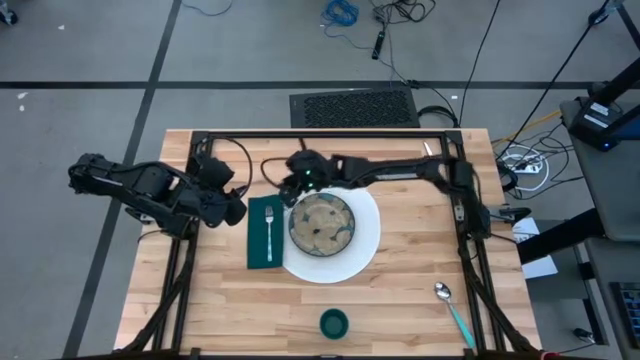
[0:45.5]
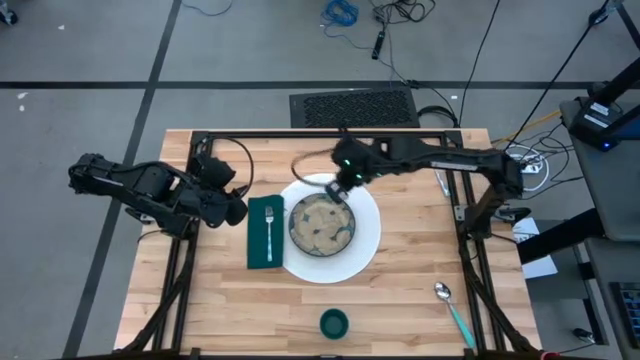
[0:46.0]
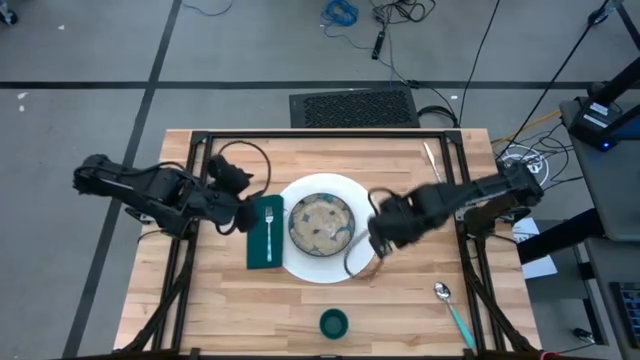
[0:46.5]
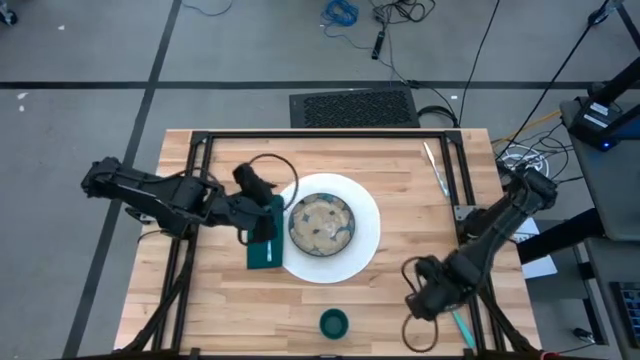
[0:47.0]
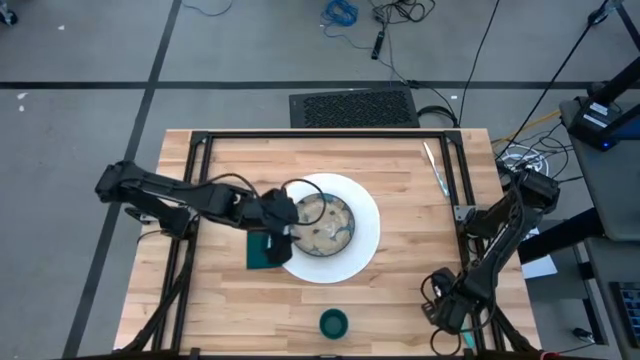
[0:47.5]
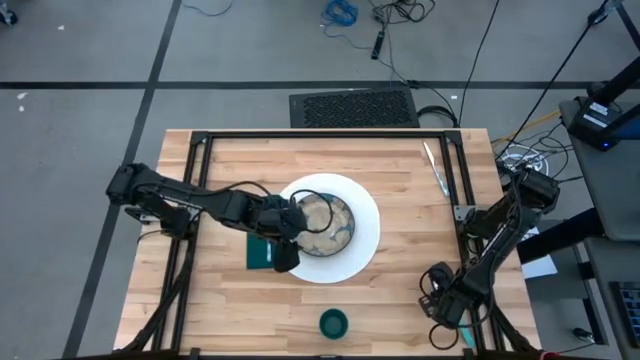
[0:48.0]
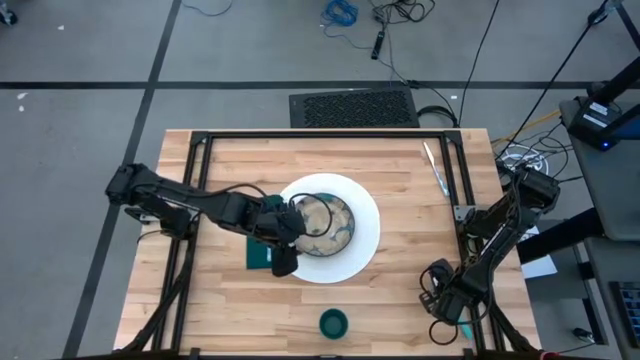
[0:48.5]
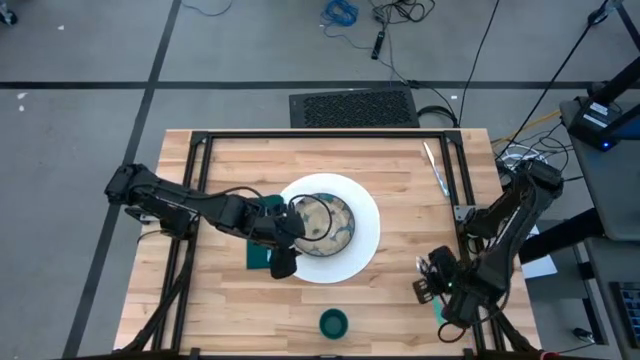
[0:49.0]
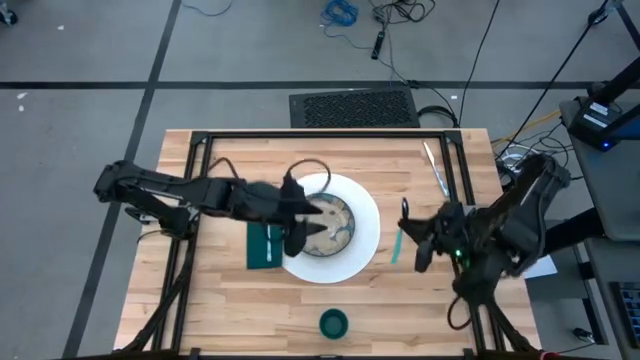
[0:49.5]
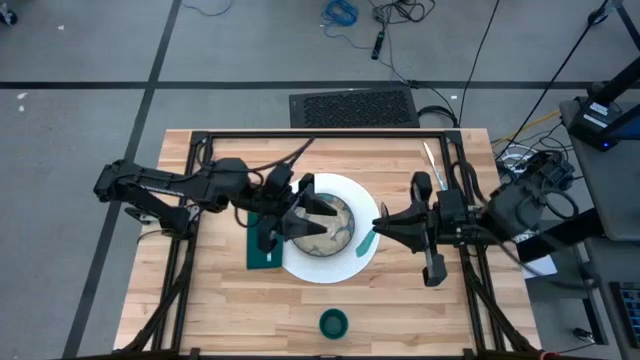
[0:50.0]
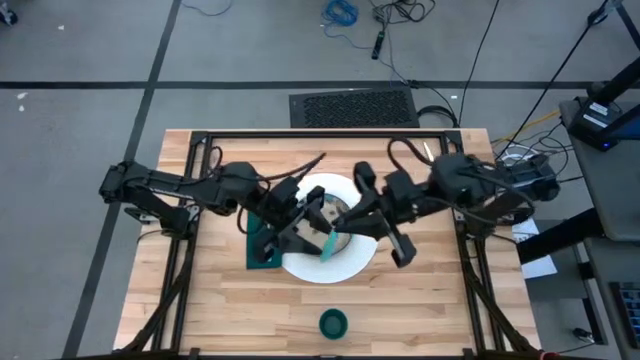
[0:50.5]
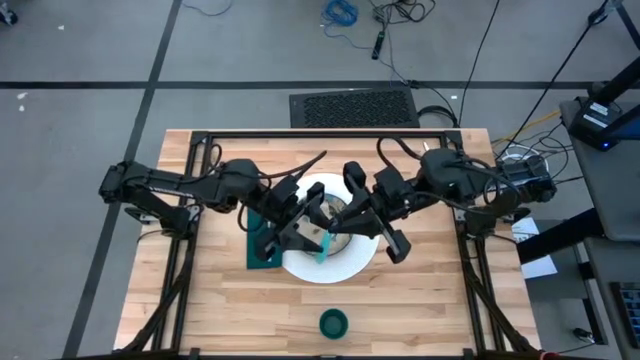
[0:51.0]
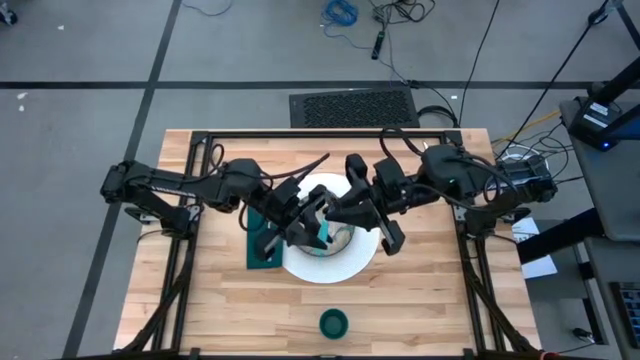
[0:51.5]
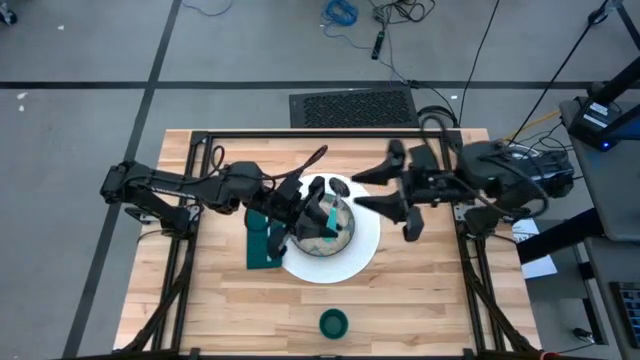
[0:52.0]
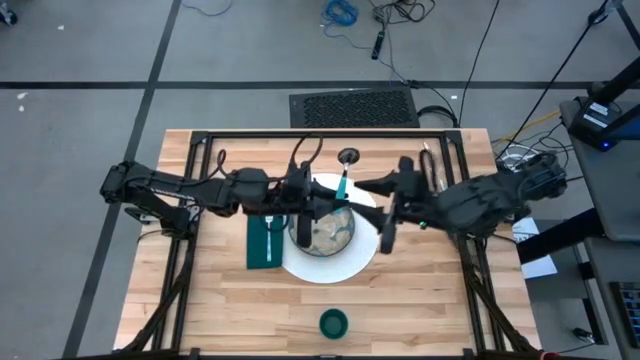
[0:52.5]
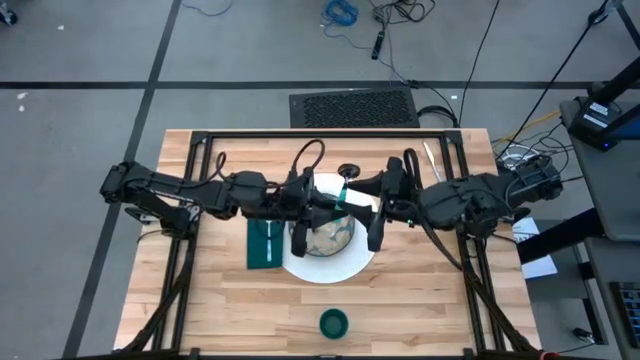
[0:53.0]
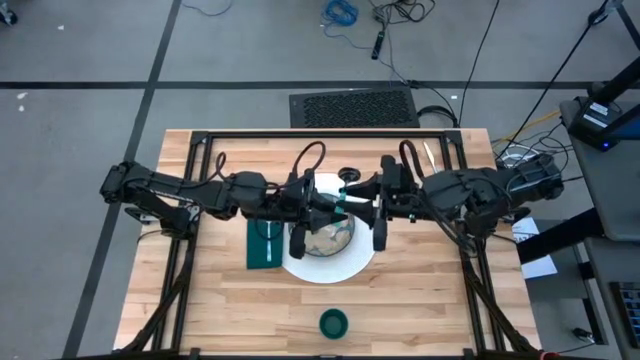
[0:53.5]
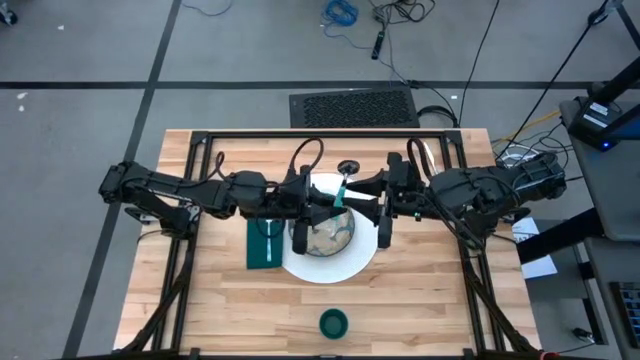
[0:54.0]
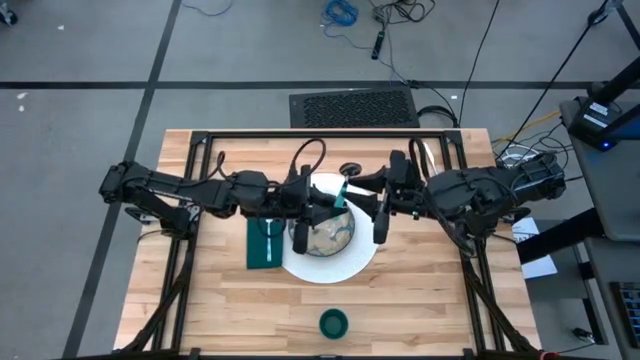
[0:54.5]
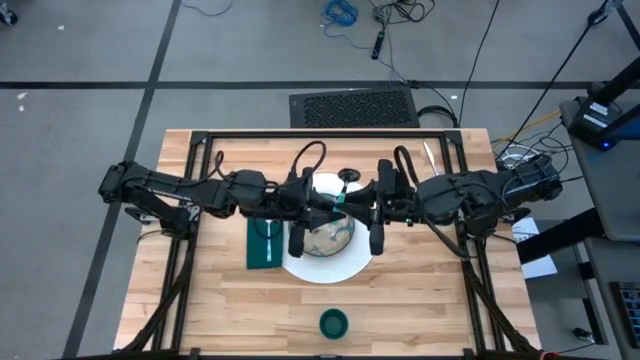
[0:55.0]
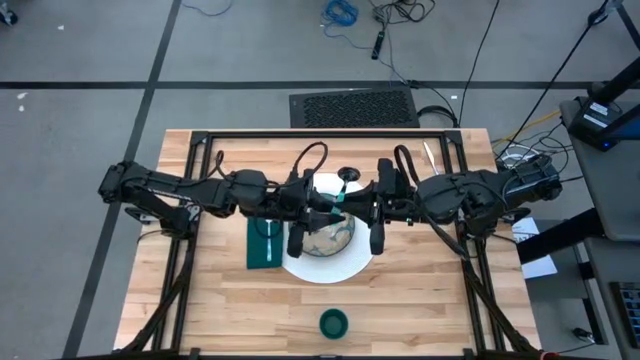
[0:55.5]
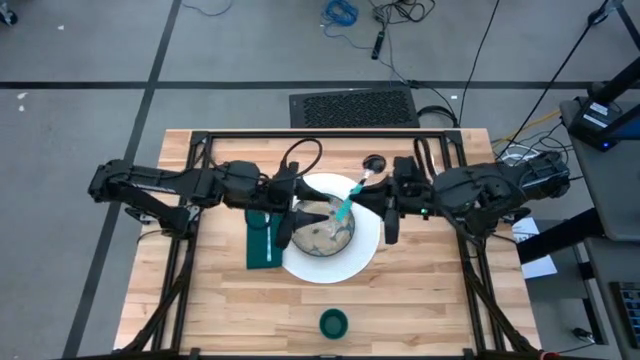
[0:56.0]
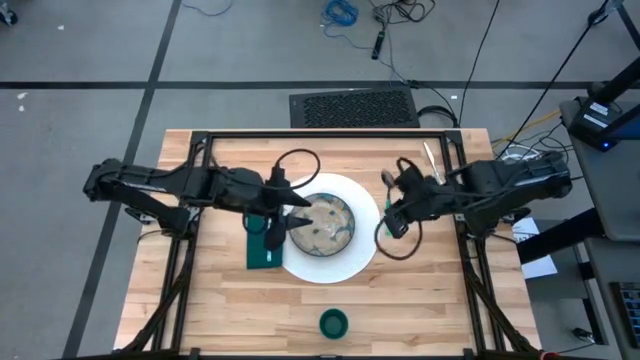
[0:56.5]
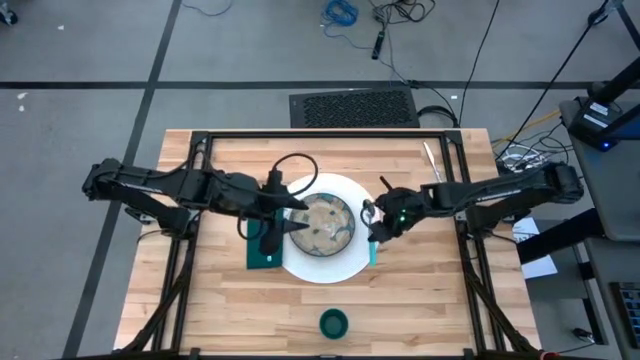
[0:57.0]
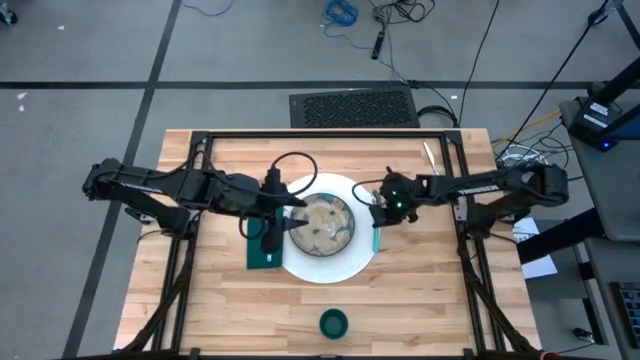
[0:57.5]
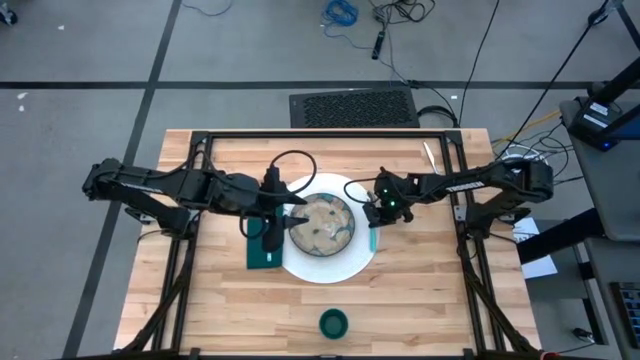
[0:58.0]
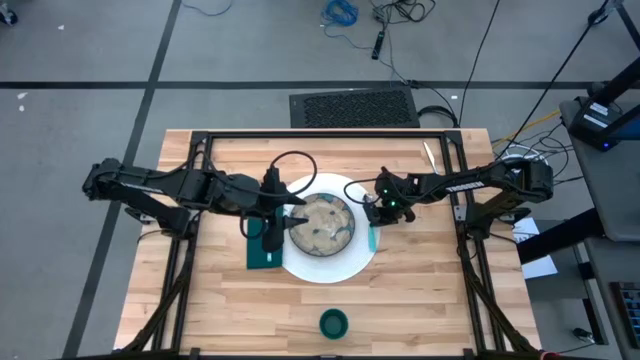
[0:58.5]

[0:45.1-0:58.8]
Task: Set table place
Put the green spoon on the right side of the plate

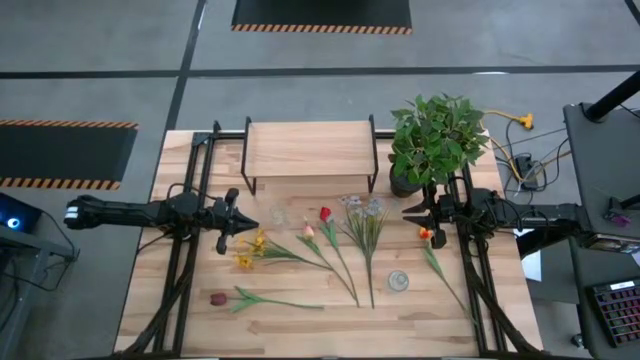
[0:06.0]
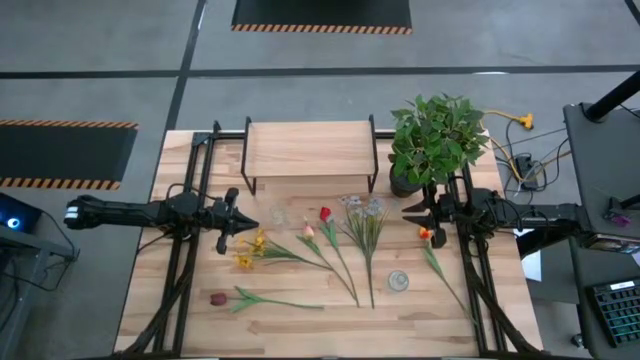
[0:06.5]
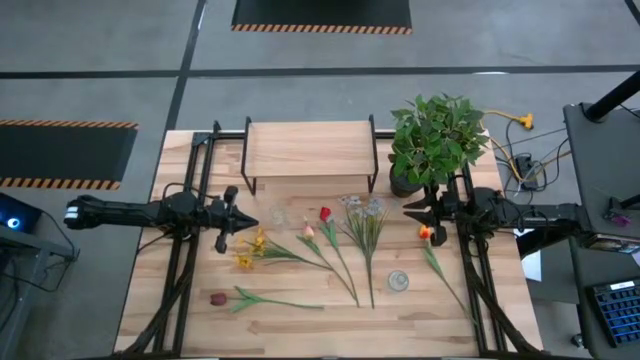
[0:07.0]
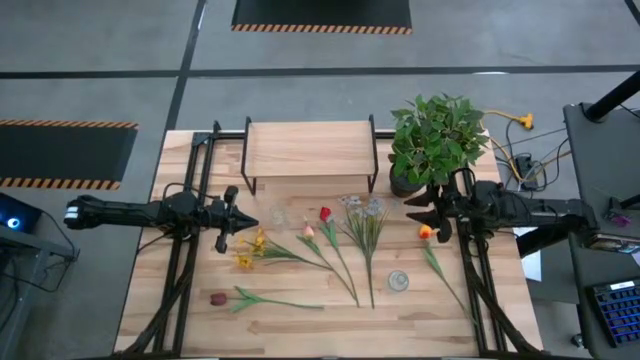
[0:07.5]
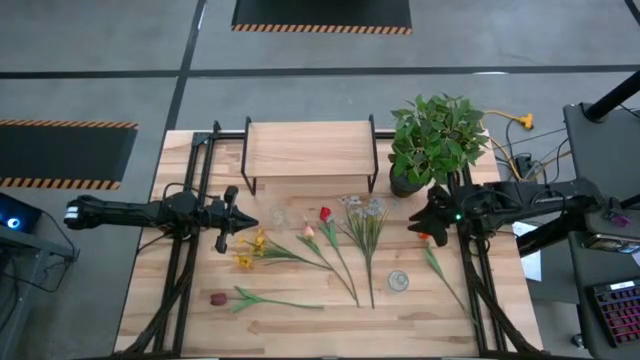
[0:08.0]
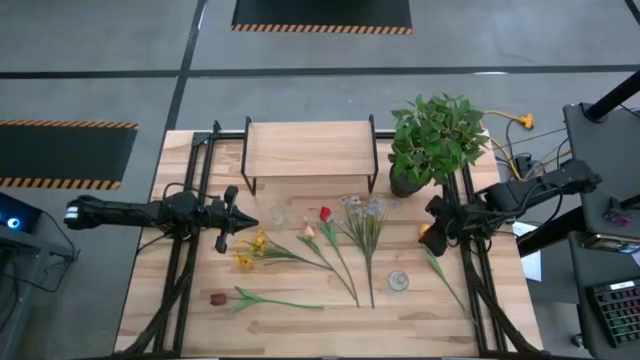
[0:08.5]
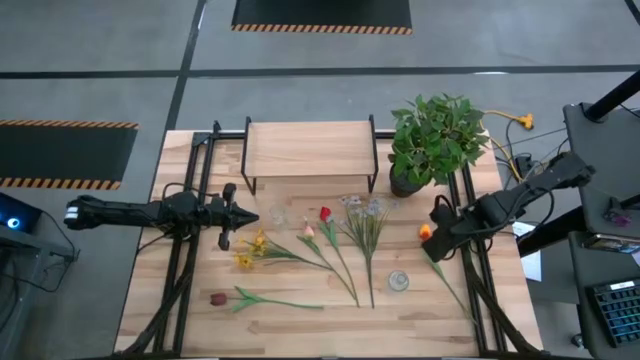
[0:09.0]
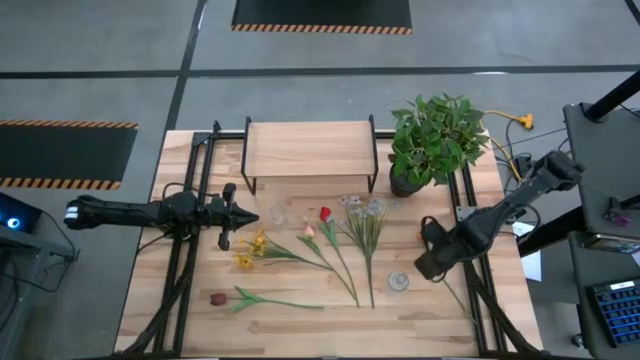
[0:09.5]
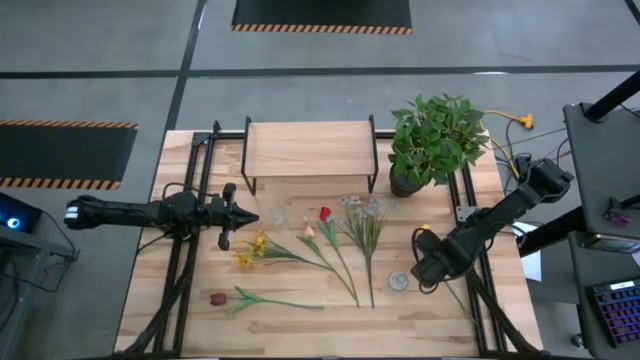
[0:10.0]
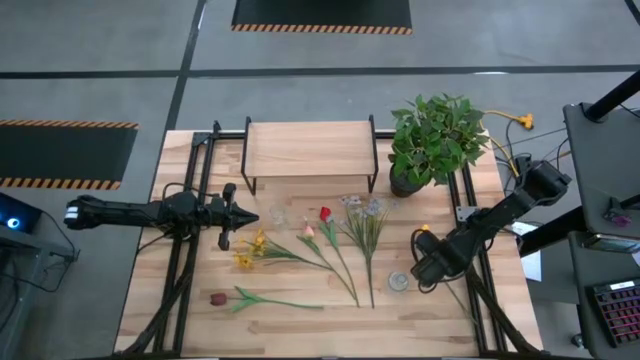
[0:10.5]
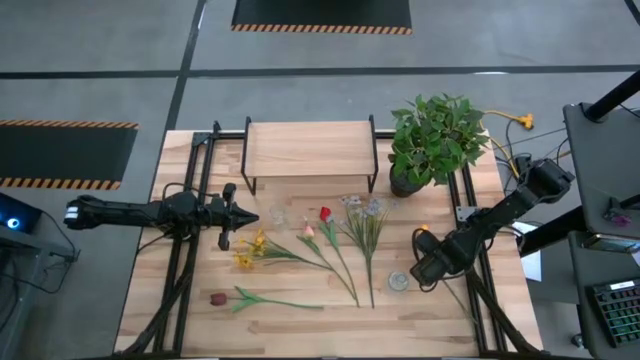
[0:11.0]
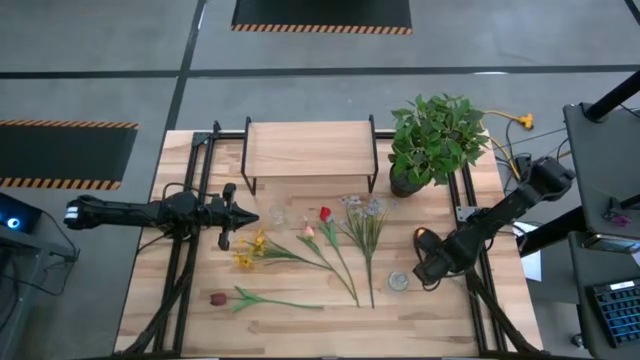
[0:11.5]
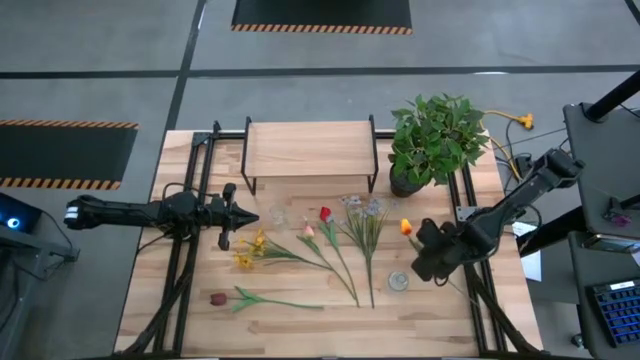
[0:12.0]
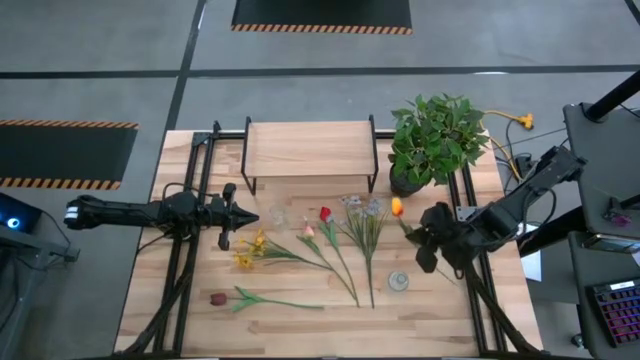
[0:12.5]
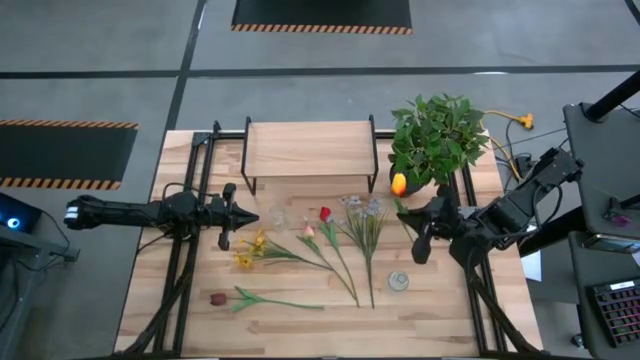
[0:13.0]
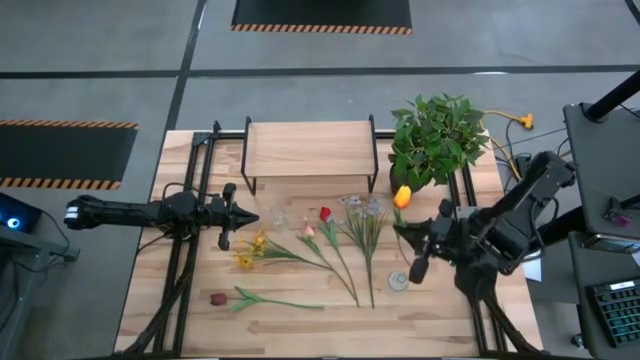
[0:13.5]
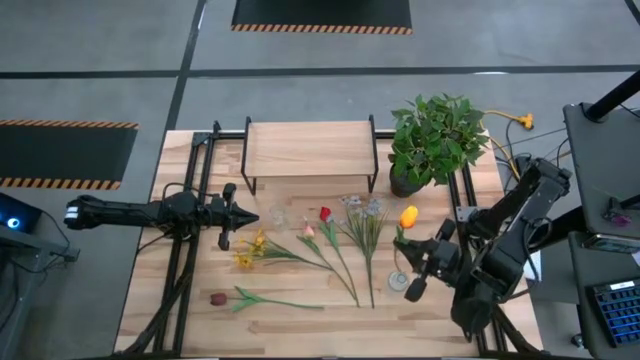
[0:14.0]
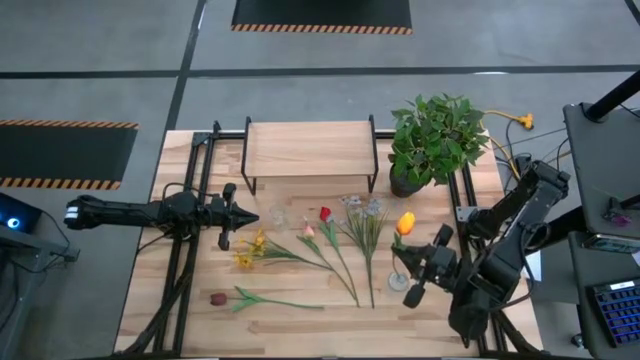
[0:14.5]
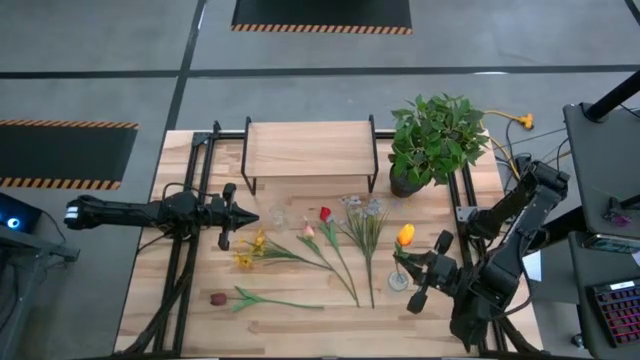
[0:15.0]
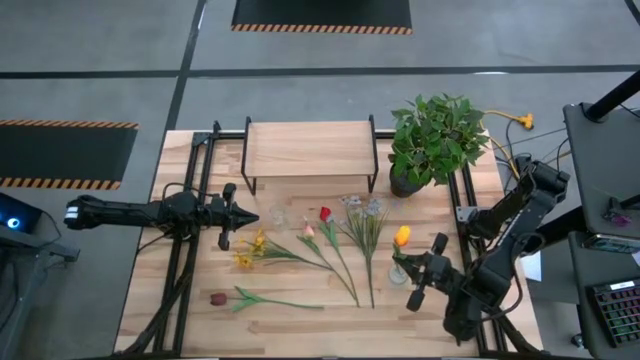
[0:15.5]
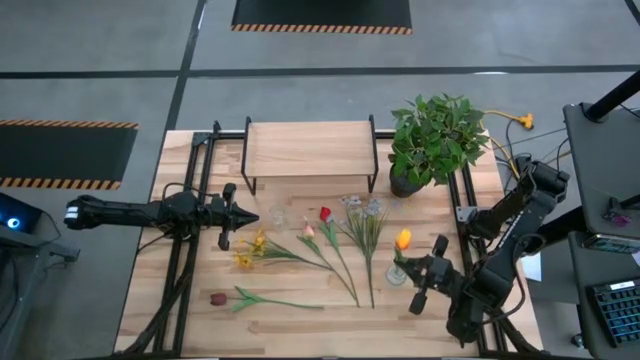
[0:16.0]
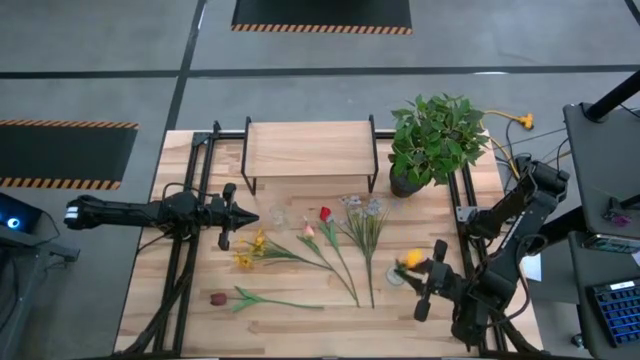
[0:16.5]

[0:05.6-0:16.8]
Task: Pick and place flowers into a vace then onto a shelf
Put the yellow tulip into the right transparent vase
